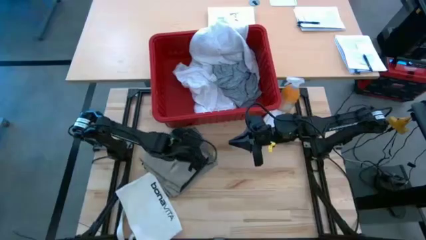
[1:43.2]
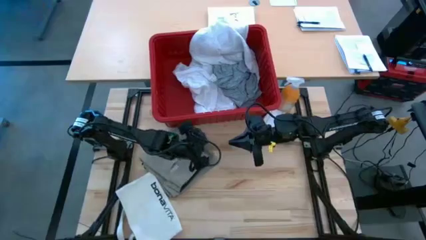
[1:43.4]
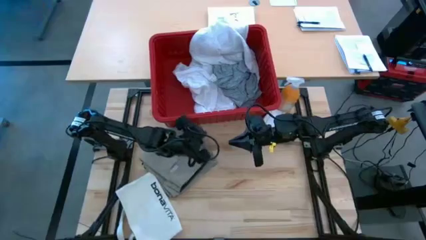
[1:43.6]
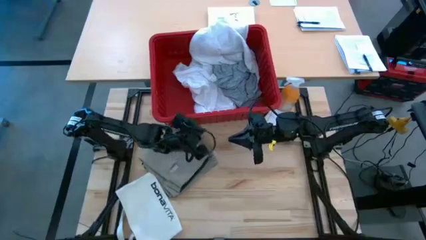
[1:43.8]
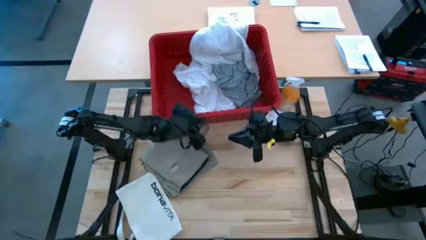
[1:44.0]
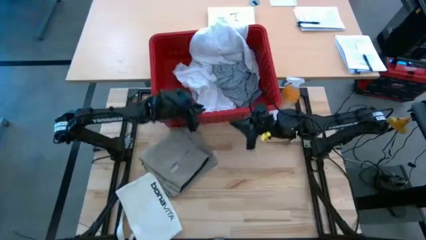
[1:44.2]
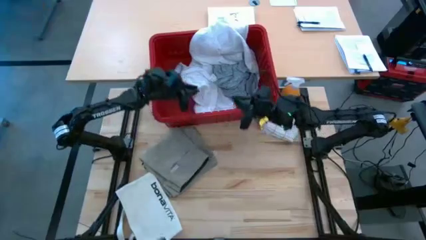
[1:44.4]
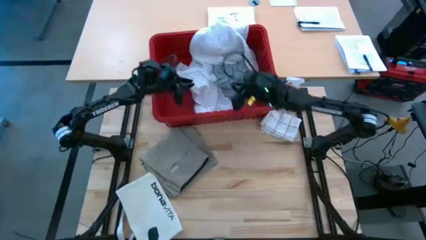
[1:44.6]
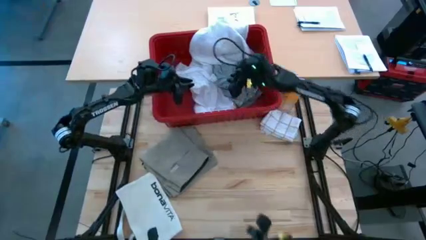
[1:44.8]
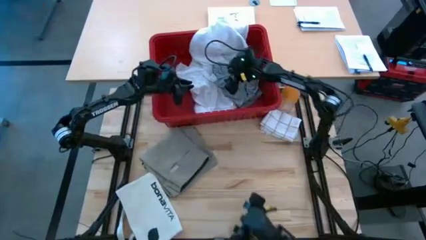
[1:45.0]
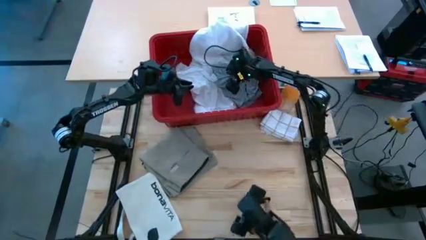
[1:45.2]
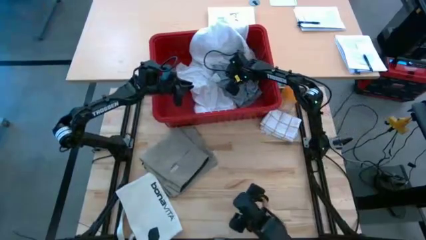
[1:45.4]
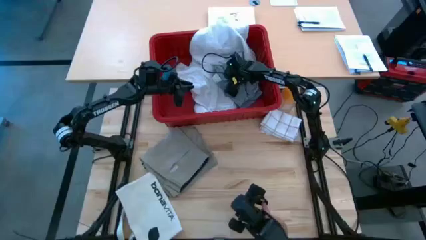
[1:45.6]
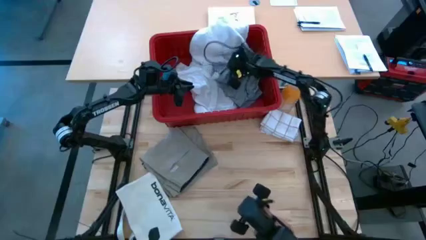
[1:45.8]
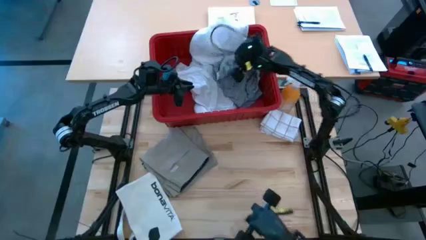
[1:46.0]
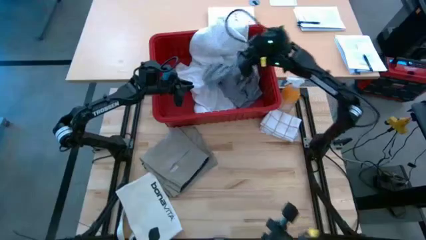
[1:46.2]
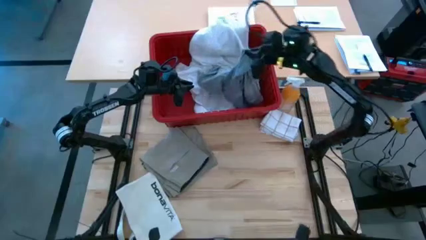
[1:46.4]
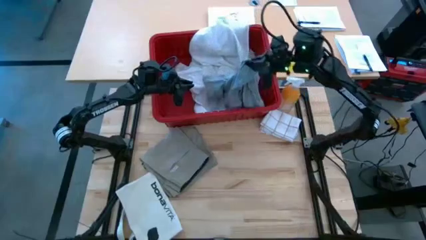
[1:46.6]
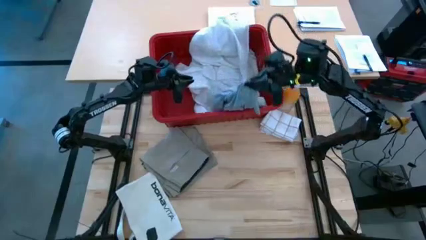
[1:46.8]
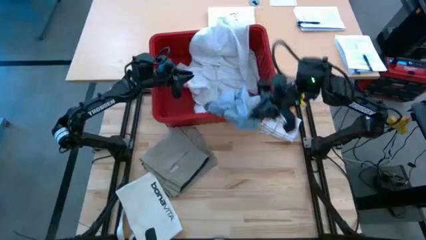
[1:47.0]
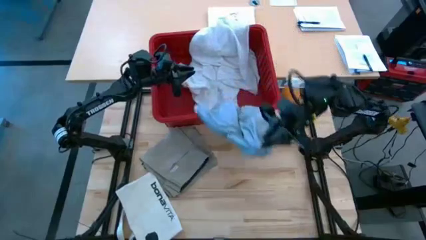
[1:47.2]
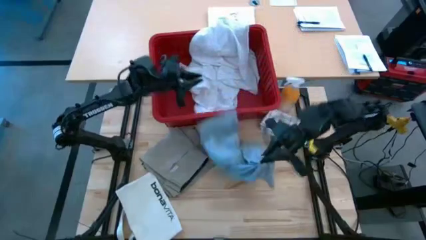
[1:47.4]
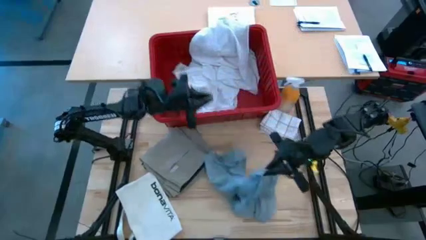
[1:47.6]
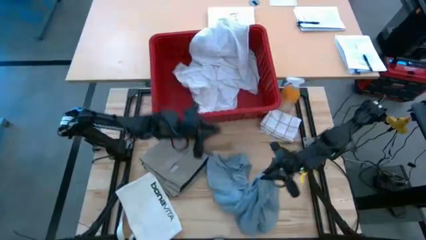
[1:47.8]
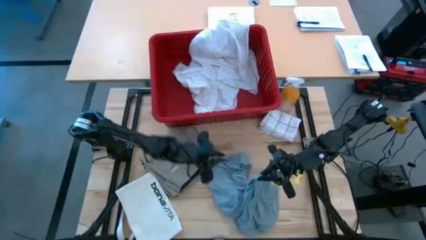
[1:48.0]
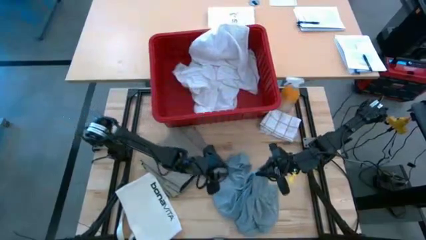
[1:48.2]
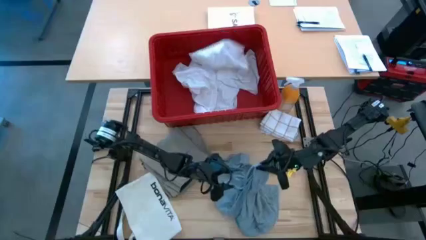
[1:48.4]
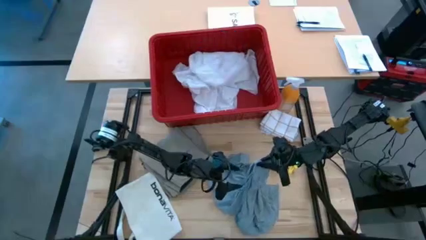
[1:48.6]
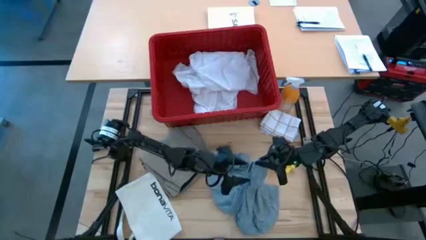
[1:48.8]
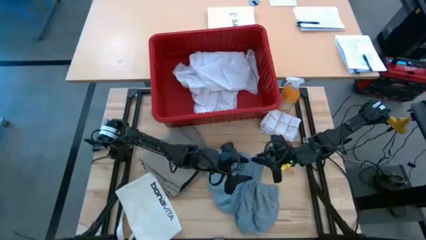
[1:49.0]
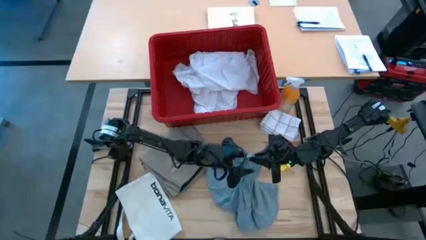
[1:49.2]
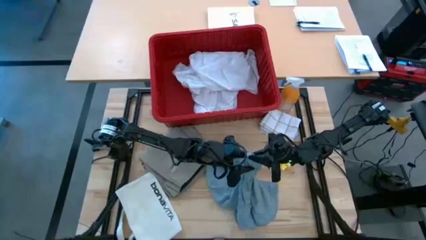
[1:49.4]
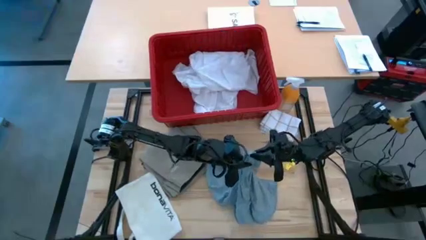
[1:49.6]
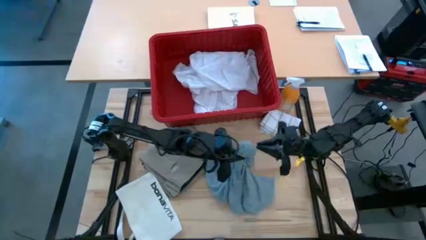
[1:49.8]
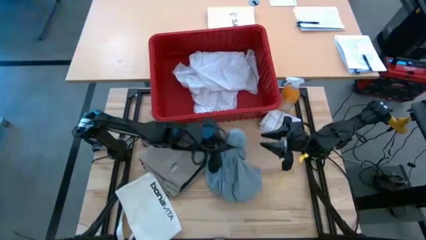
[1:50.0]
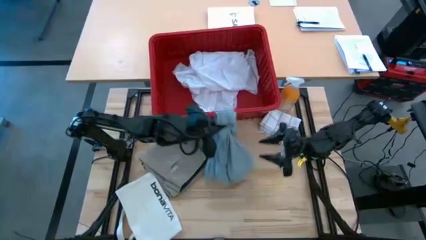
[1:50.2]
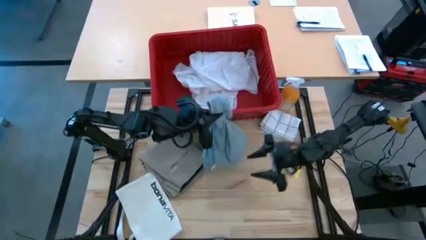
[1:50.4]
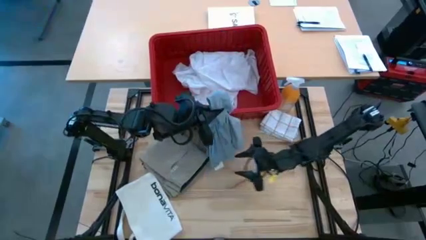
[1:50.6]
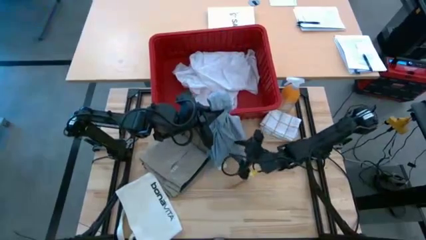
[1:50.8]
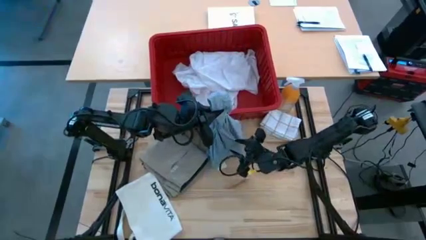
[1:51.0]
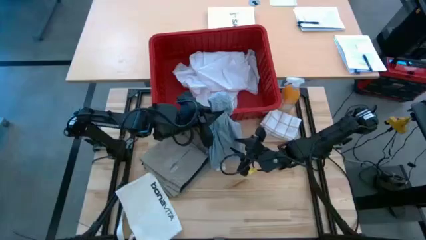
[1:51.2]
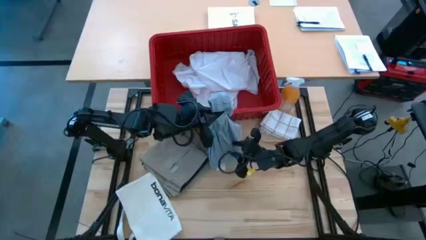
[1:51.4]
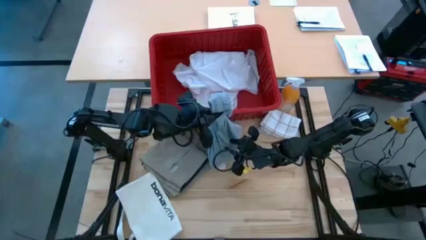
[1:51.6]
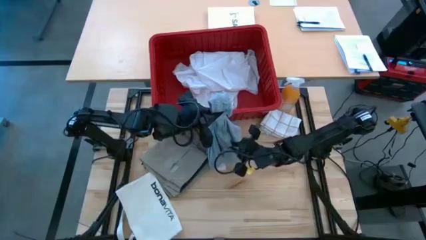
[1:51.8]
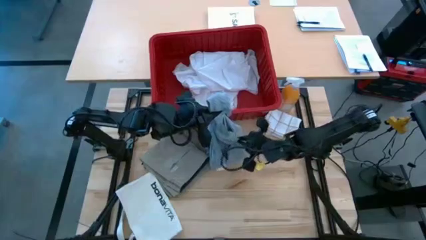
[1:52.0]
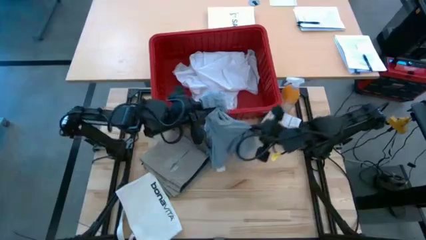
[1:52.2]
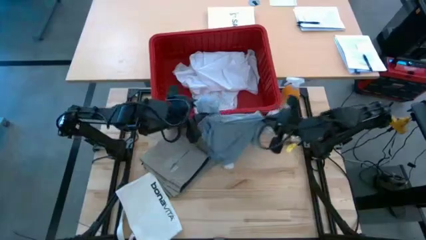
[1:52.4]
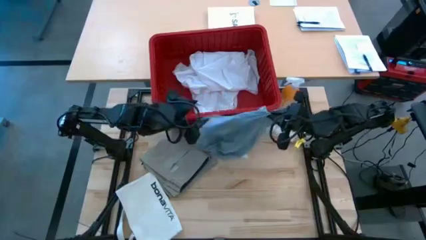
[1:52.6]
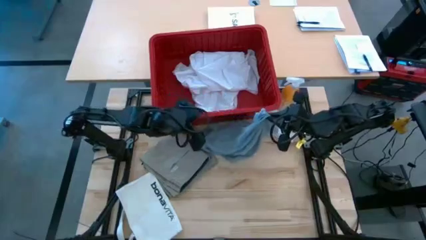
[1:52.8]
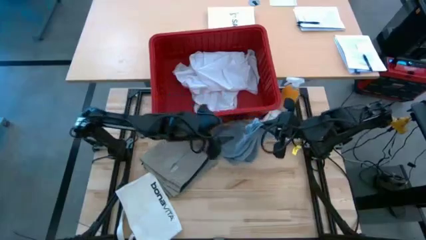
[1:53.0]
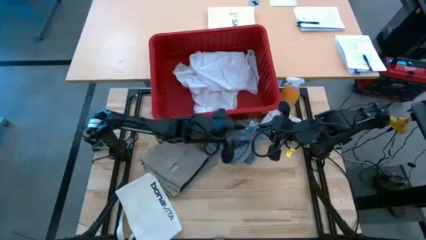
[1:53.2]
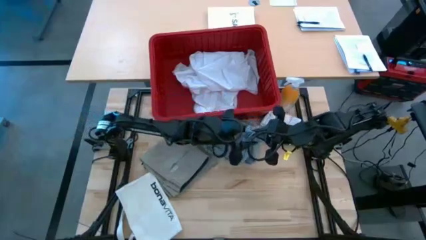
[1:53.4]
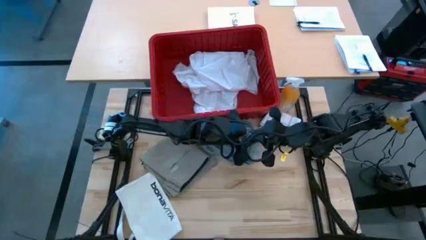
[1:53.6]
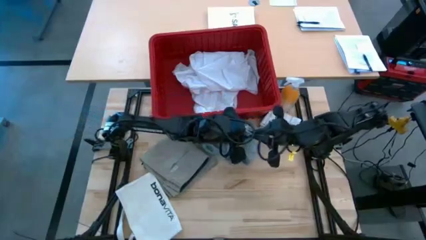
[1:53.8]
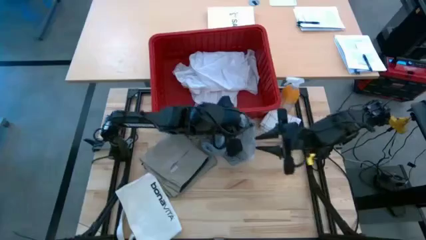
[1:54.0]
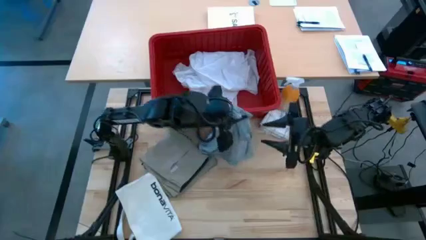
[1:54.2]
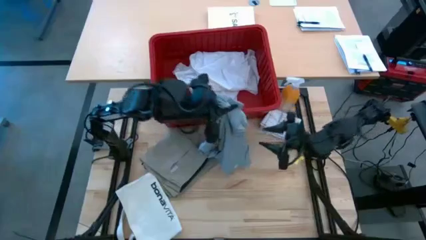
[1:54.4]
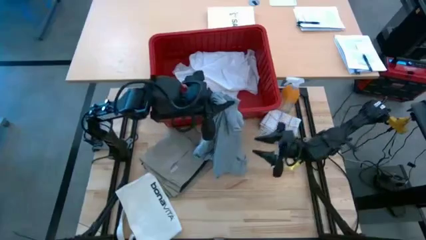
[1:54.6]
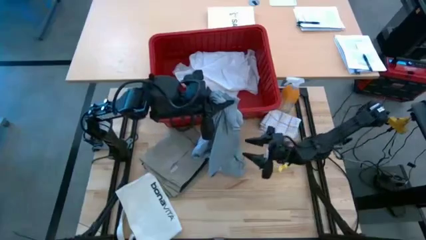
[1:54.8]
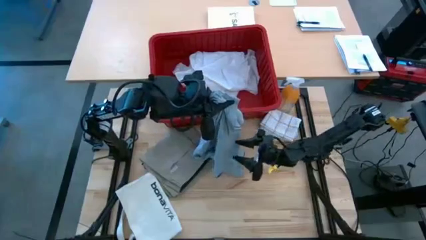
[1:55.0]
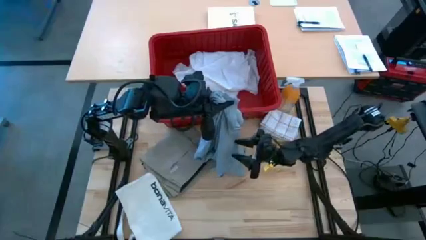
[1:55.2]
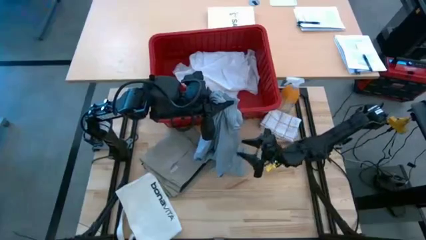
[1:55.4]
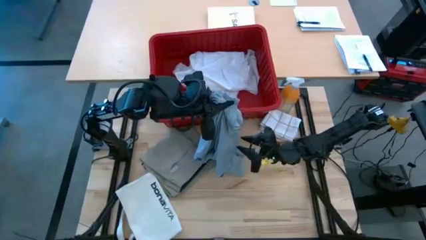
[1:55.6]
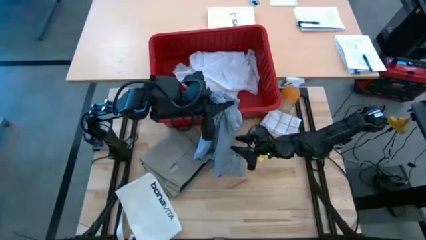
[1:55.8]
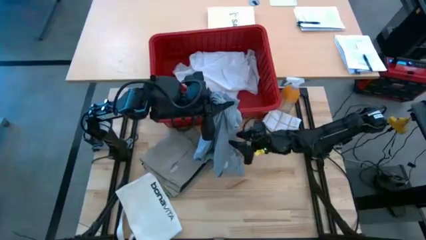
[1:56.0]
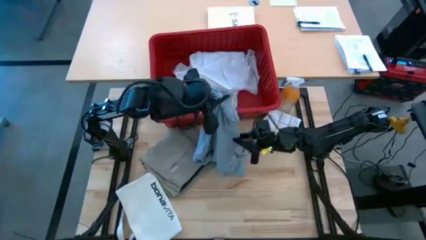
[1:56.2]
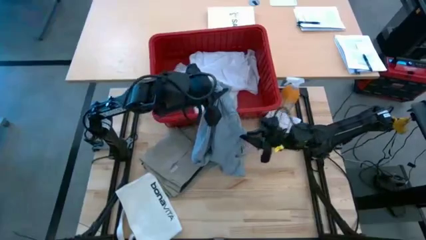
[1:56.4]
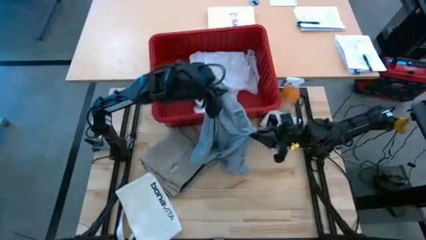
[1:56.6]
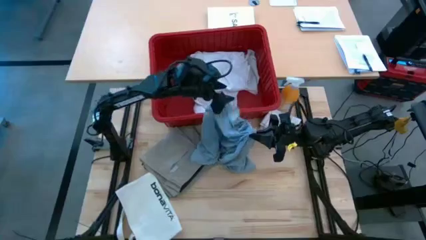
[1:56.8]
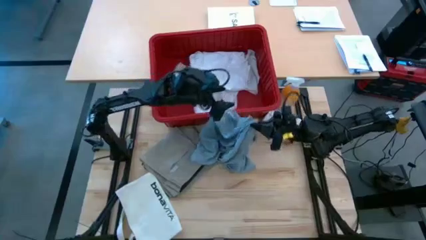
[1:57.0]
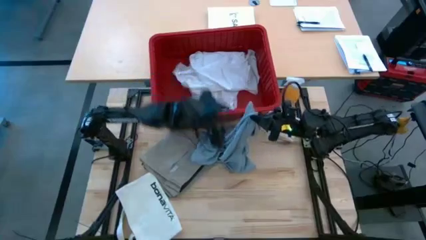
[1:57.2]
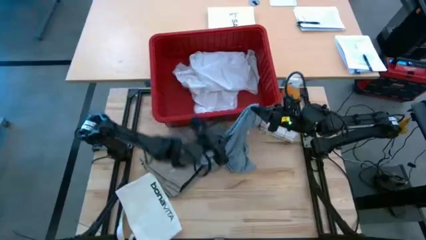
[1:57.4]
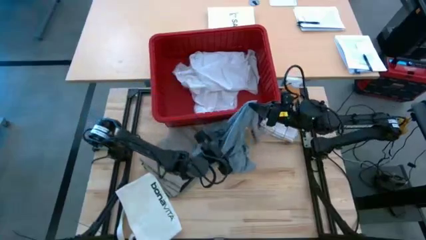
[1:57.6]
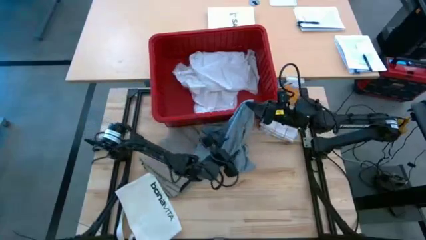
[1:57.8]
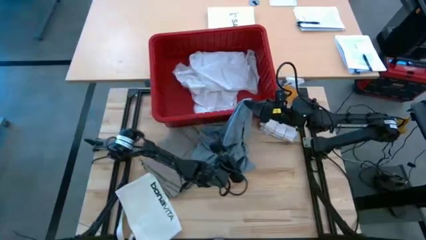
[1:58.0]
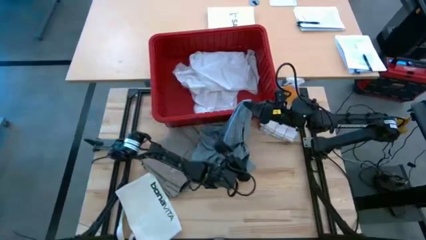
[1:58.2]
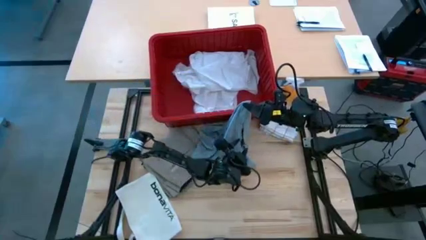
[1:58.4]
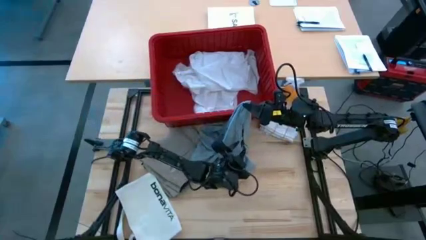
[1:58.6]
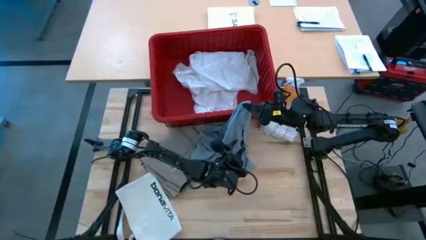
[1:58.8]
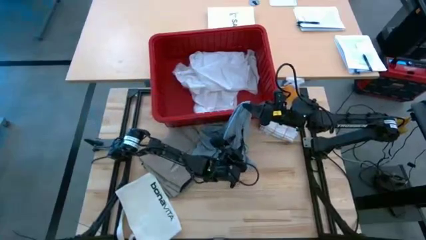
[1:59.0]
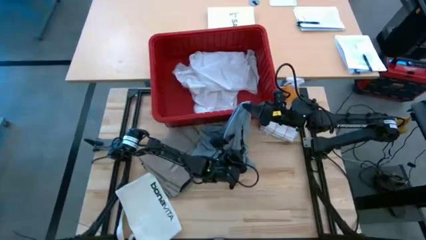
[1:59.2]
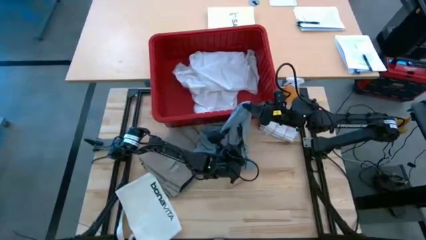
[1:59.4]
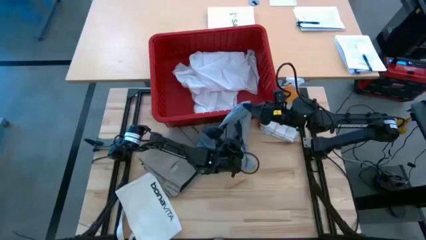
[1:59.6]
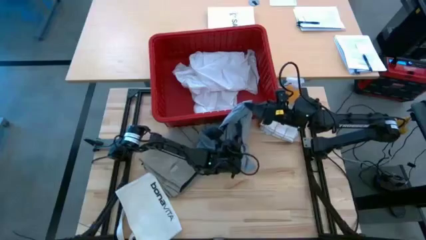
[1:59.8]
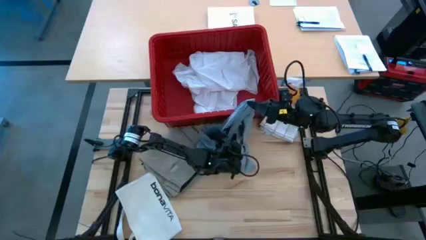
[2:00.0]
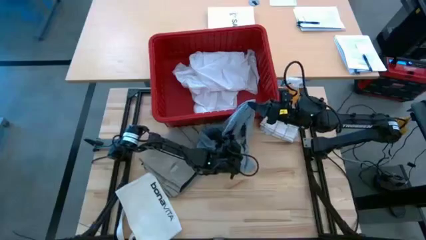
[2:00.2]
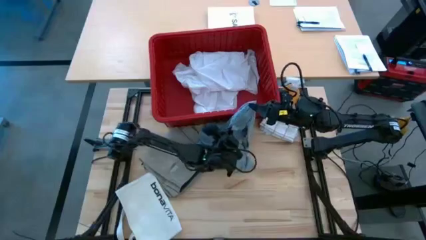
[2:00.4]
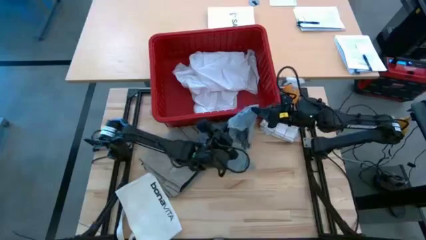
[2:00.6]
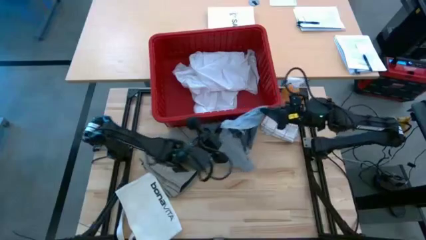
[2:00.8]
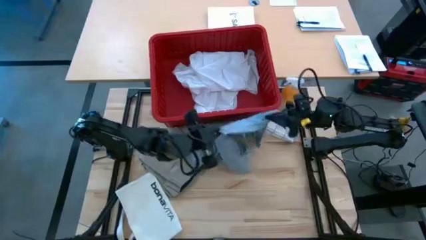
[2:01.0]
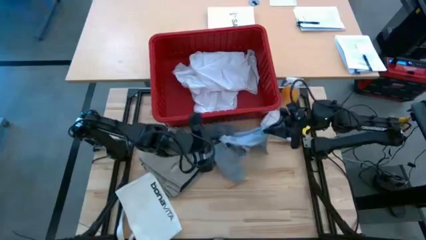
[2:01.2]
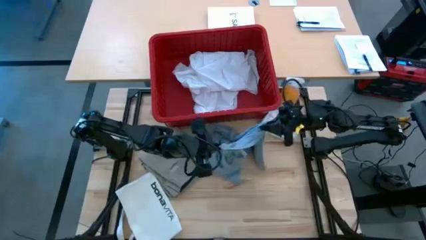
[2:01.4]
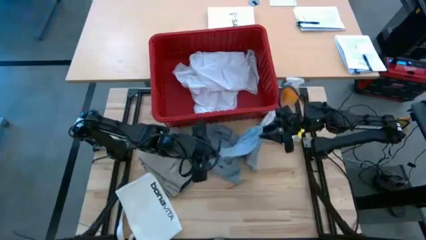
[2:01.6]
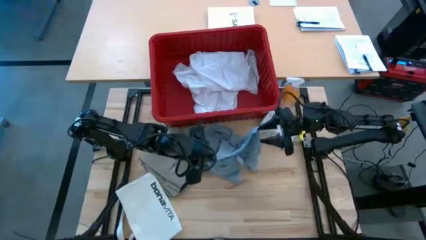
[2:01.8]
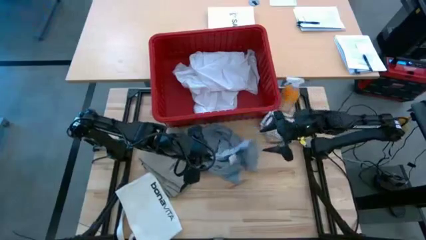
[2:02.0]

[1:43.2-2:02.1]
Task: Fold laundry
Fold the gray shirt
